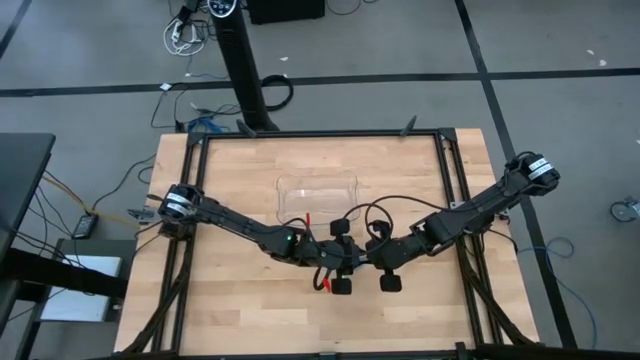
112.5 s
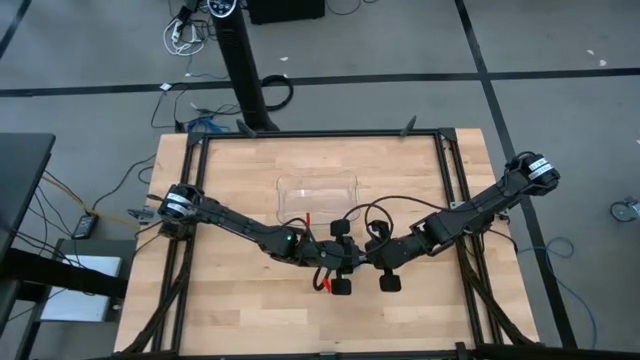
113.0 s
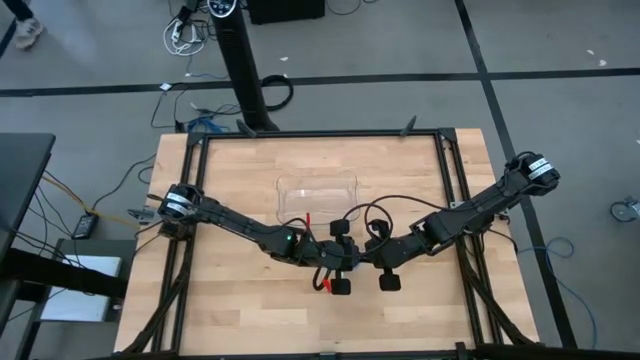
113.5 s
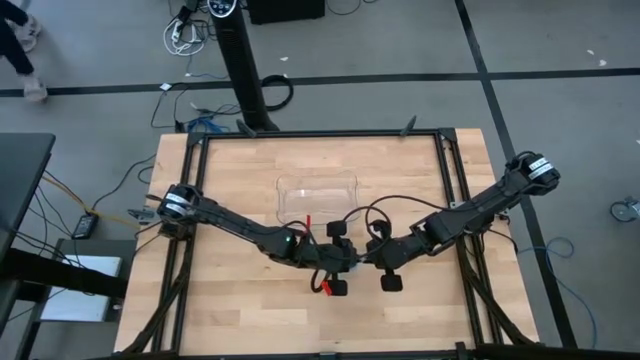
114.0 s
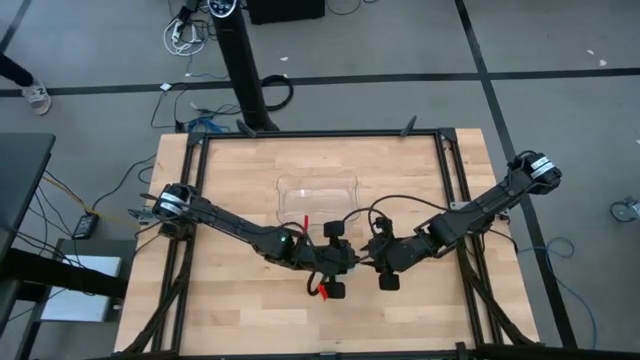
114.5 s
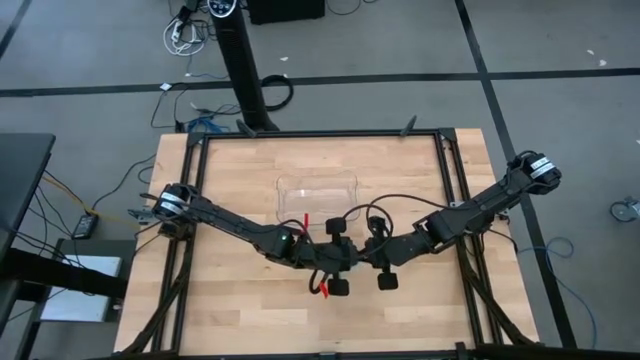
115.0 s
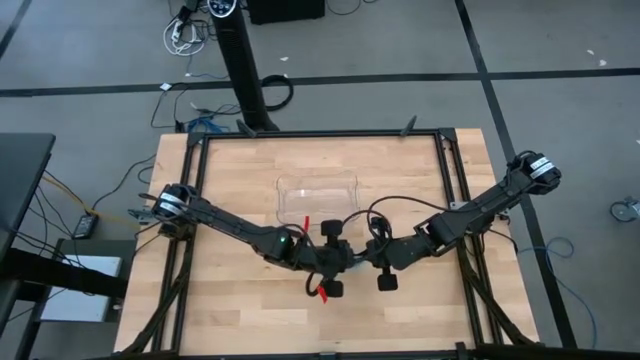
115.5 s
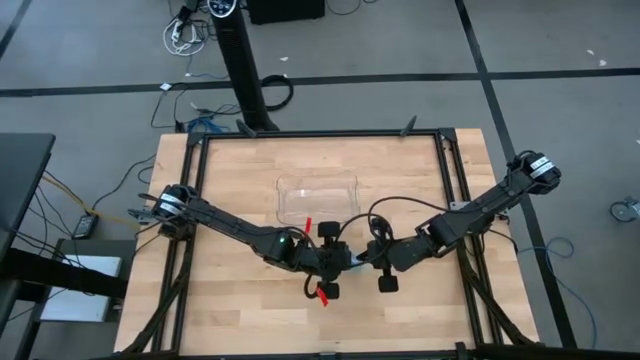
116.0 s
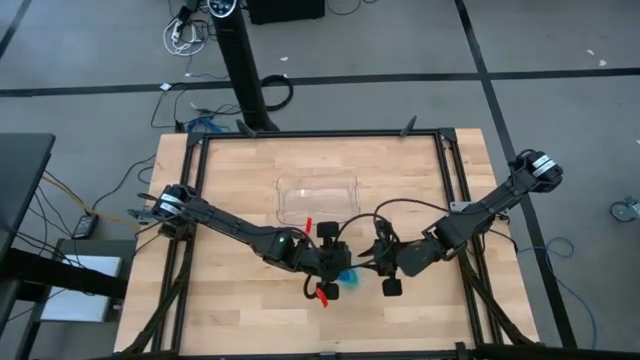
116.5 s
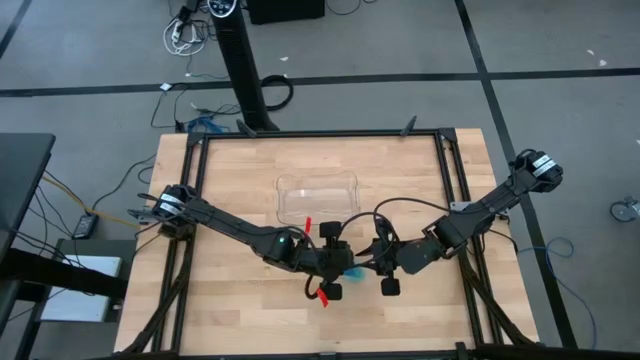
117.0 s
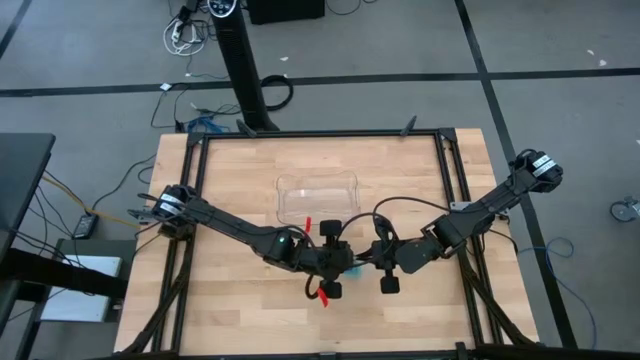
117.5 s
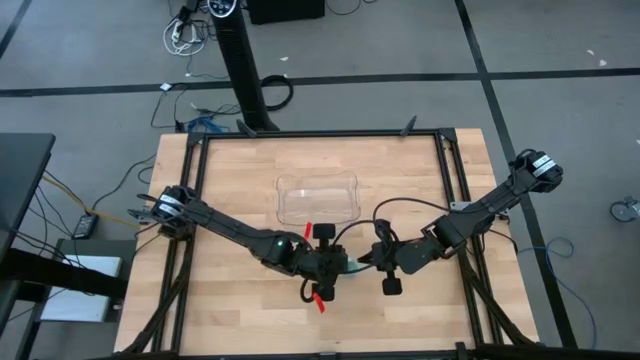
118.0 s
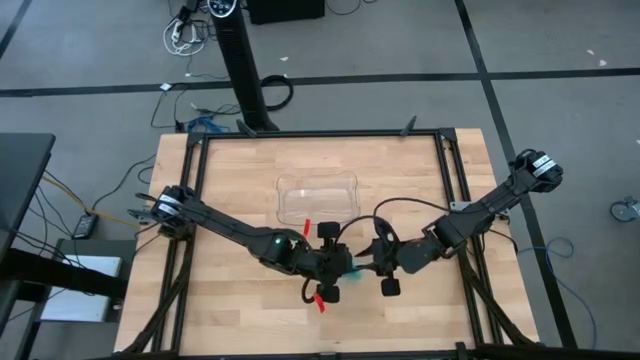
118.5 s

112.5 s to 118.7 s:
Task: Roll bandage
Close the transparent zip bag

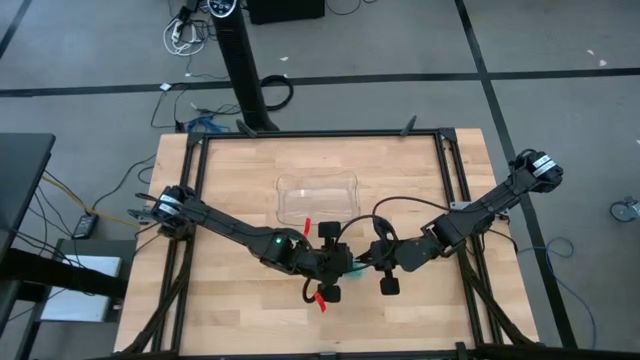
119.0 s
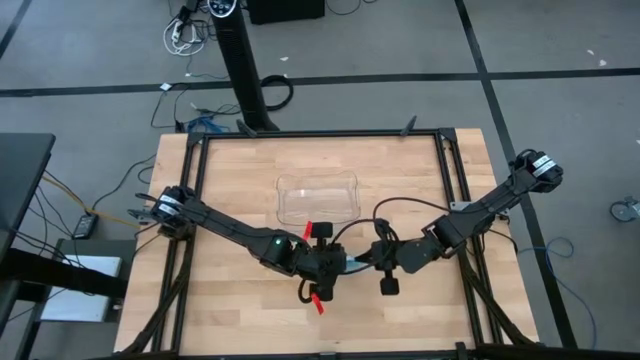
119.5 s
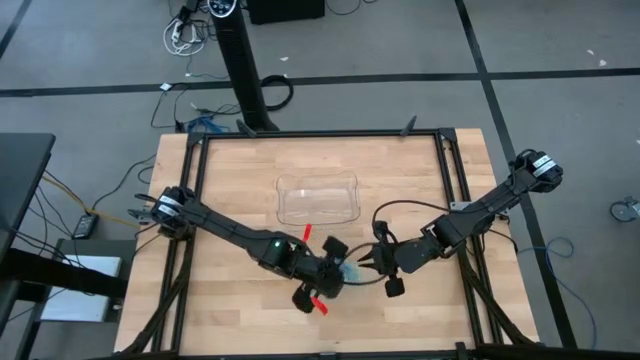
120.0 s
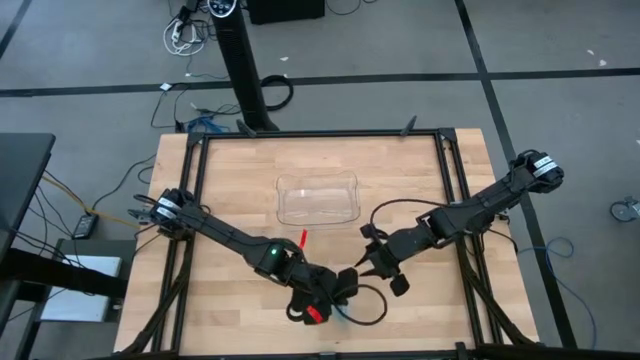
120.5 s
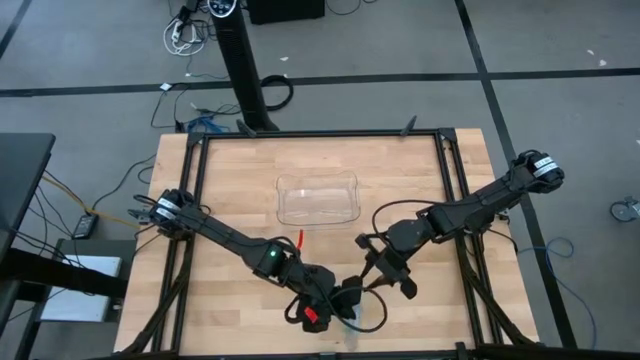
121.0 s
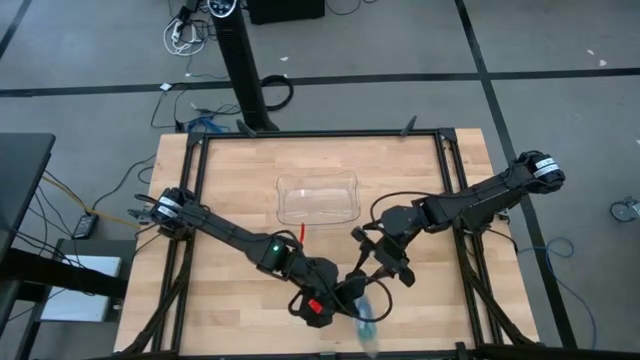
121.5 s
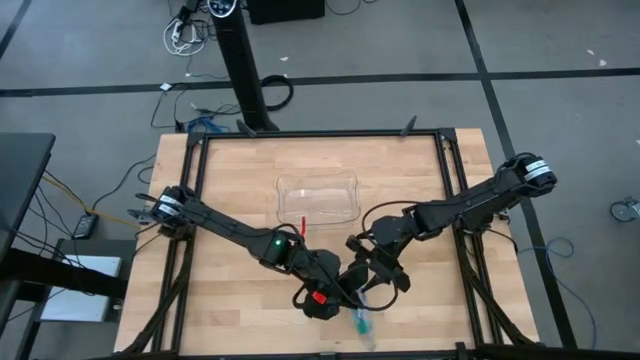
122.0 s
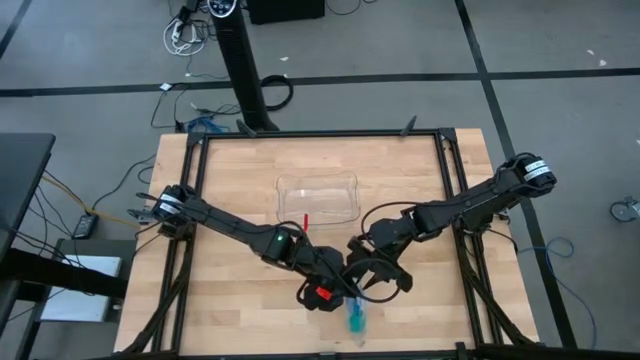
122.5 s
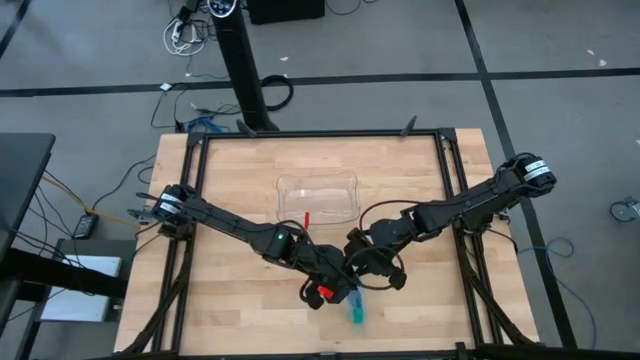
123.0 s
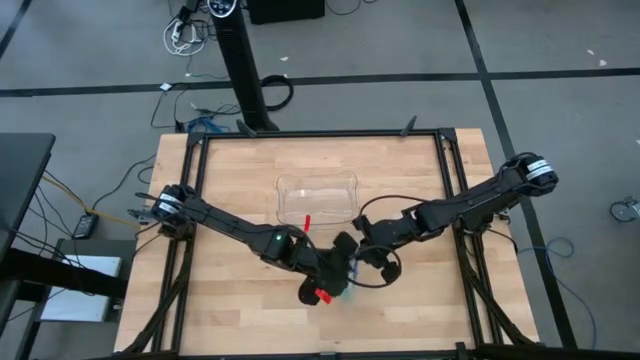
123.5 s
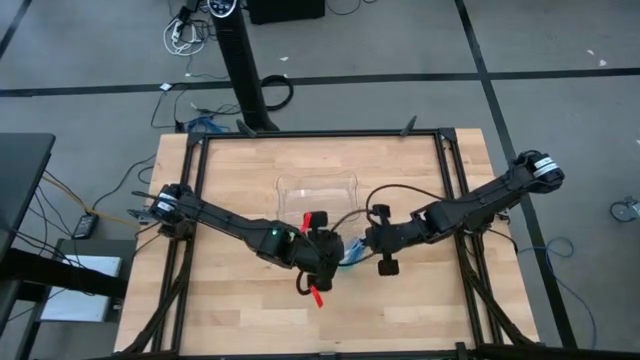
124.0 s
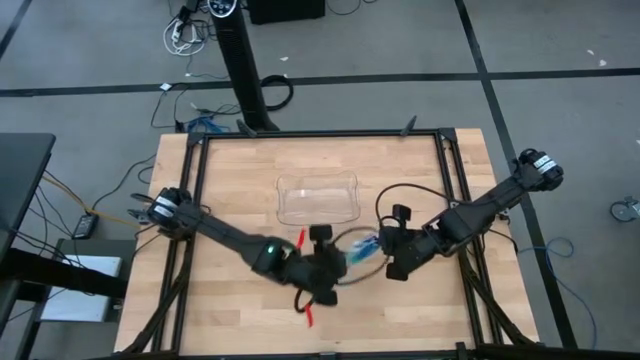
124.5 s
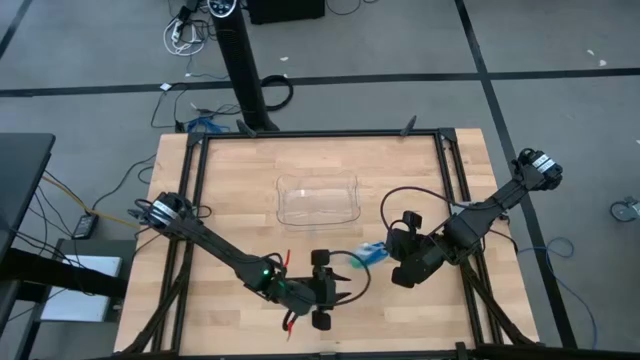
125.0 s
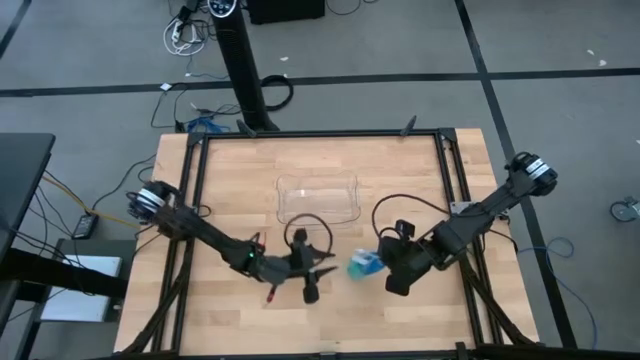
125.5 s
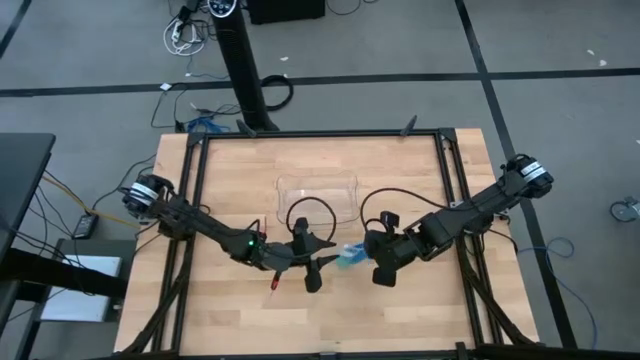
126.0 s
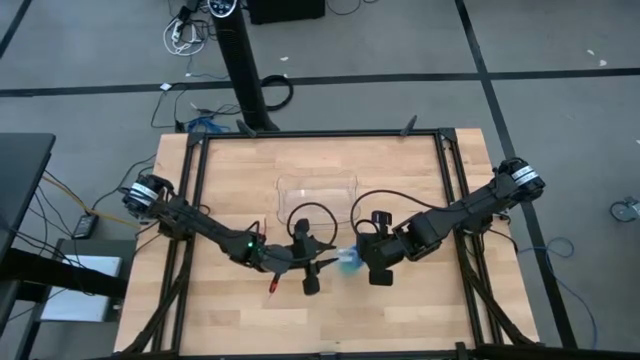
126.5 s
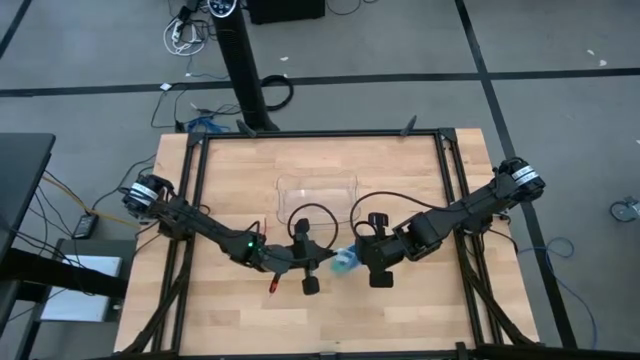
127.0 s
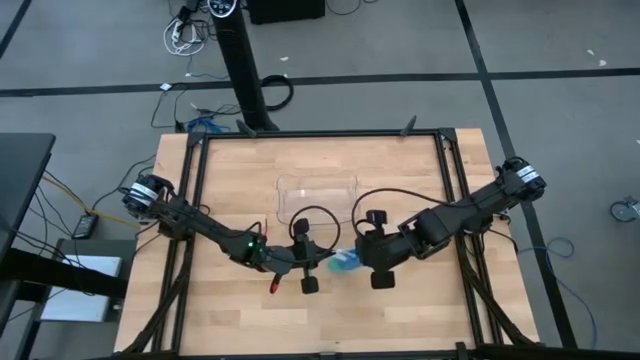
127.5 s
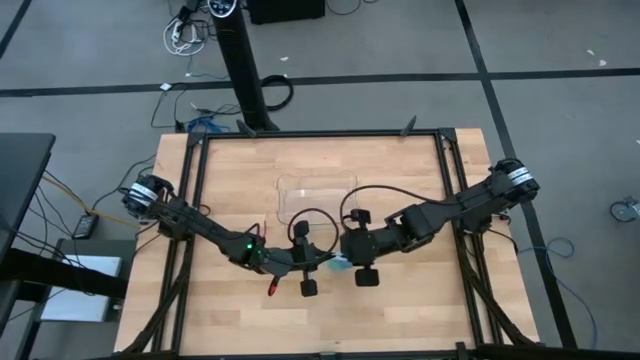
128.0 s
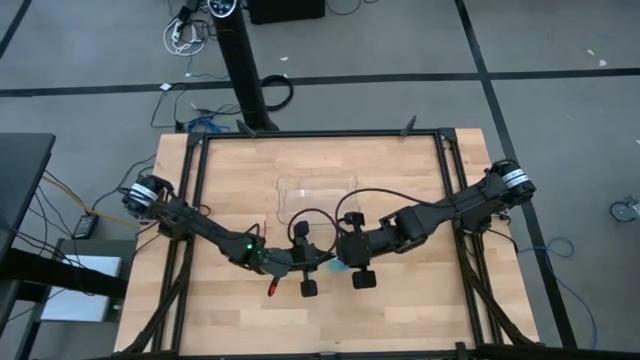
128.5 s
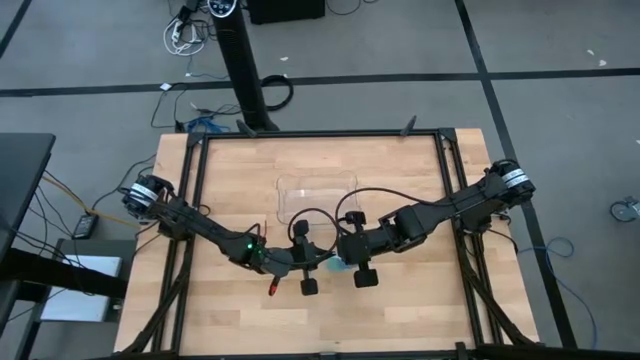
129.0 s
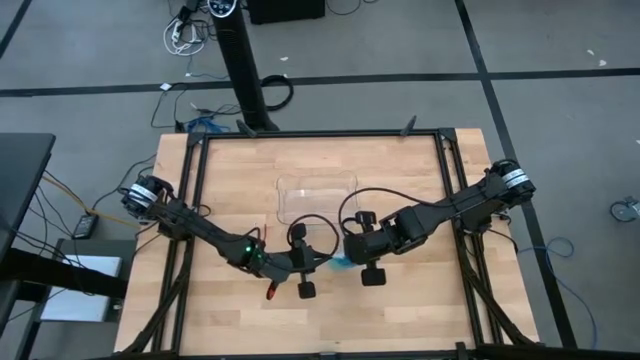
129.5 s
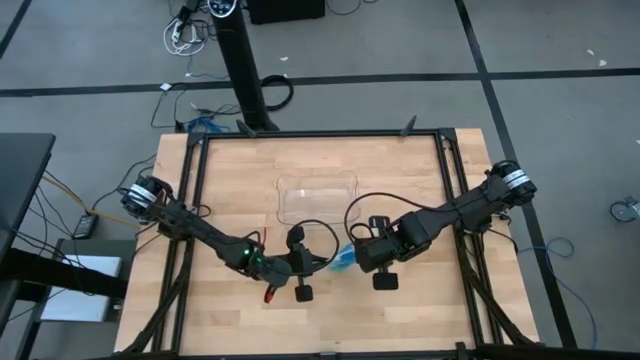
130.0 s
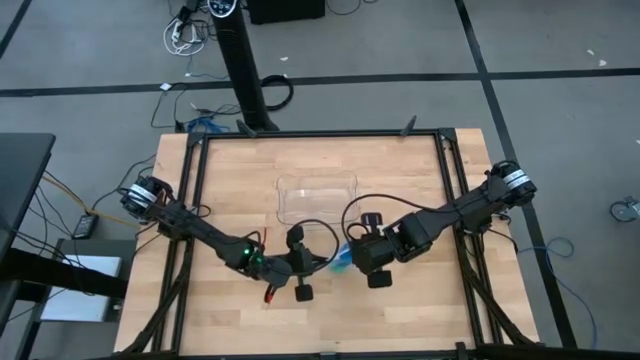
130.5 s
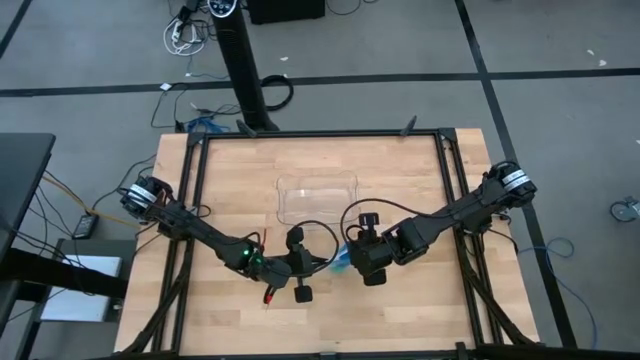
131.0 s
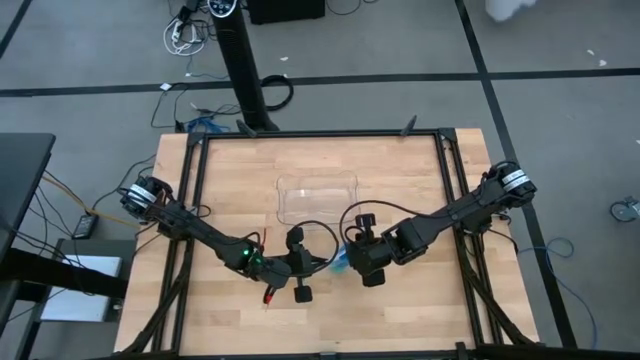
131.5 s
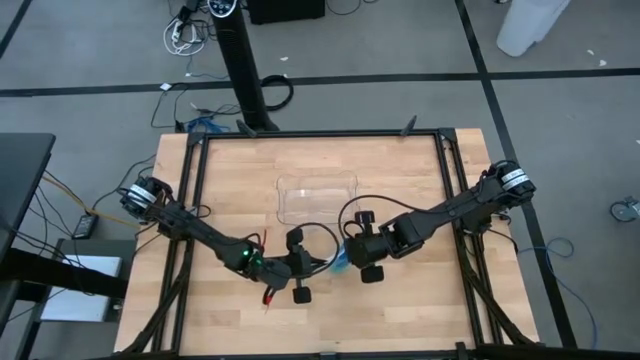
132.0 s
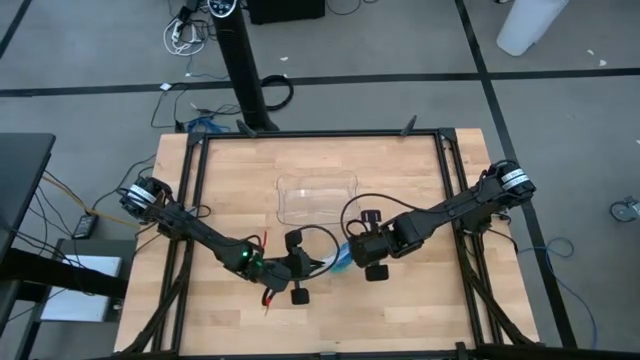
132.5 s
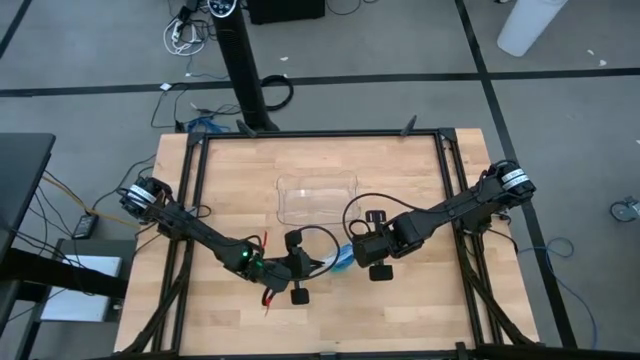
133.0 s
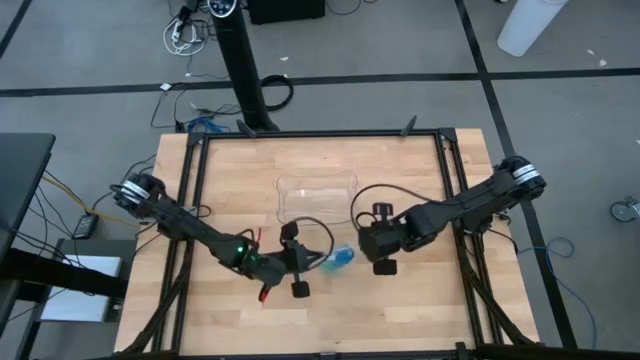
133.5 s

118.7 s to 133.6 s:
Close the transparent zip bag
